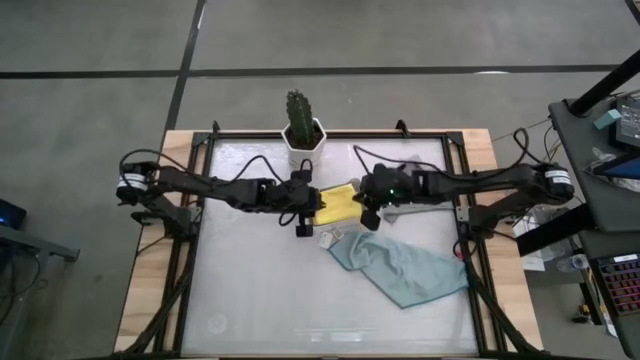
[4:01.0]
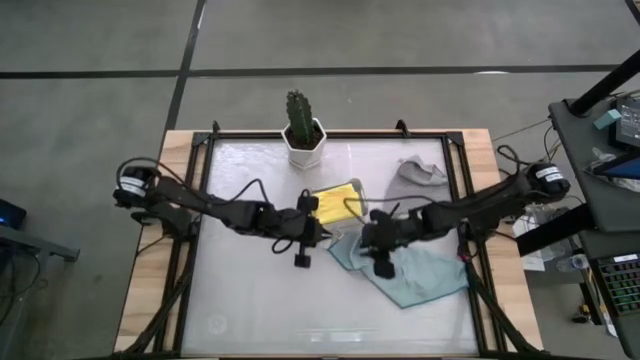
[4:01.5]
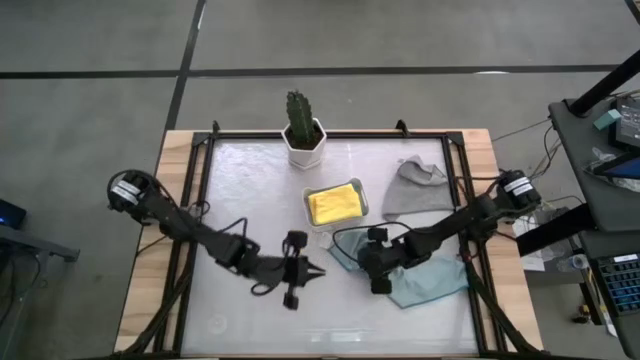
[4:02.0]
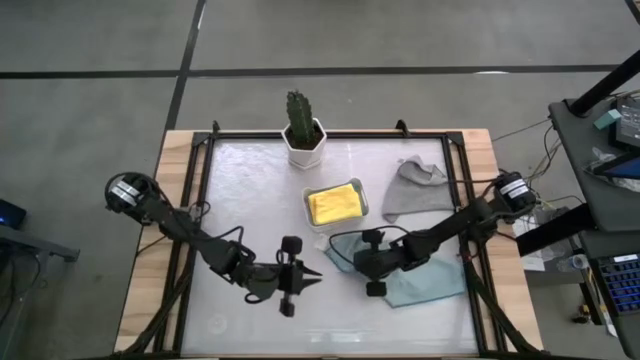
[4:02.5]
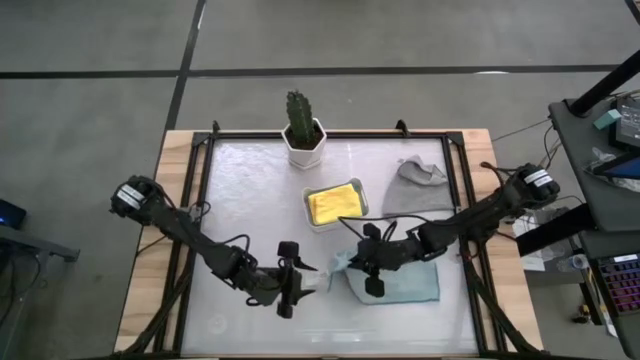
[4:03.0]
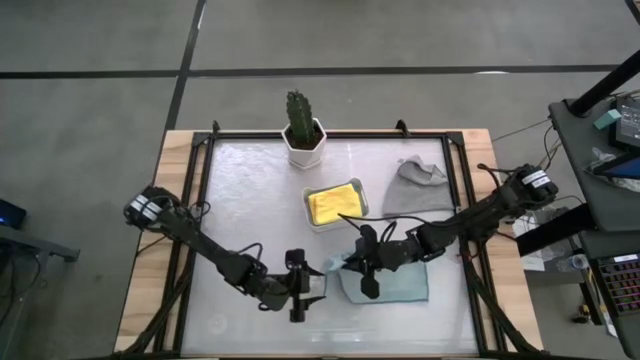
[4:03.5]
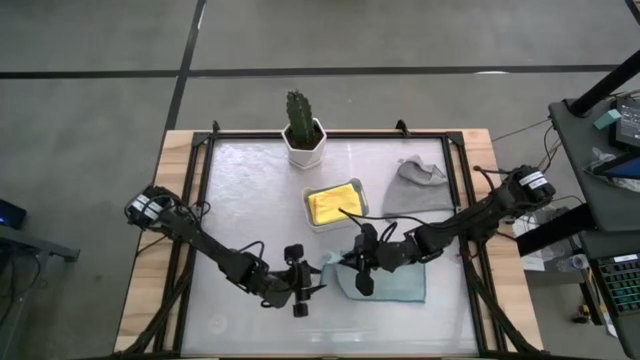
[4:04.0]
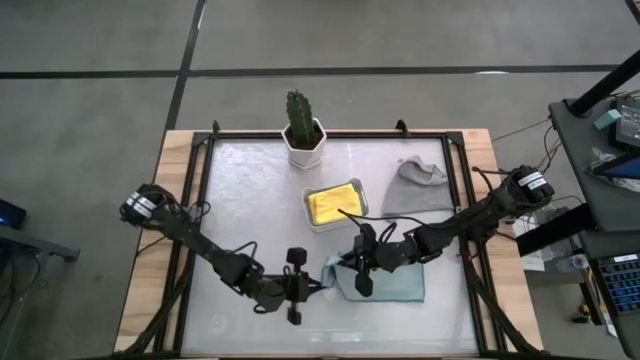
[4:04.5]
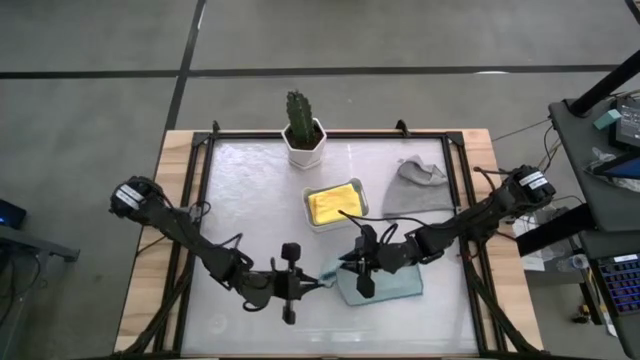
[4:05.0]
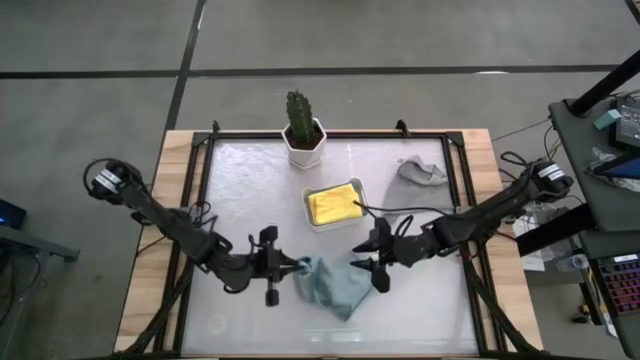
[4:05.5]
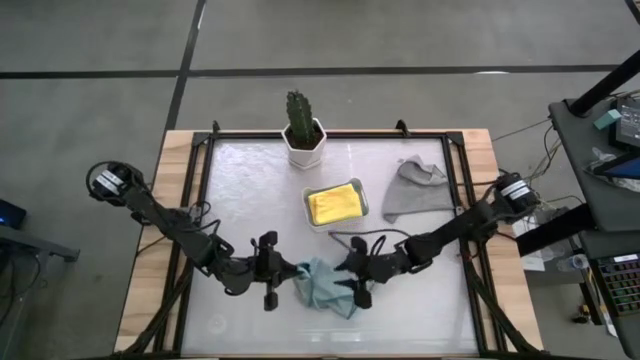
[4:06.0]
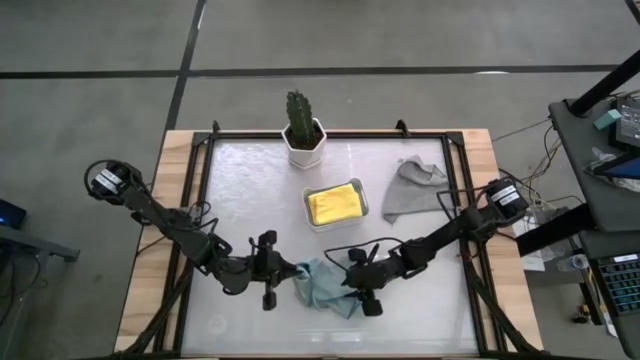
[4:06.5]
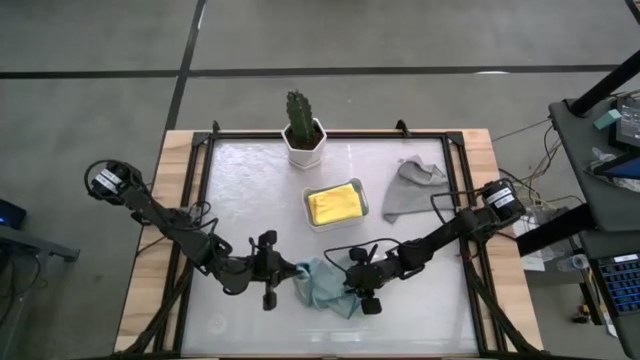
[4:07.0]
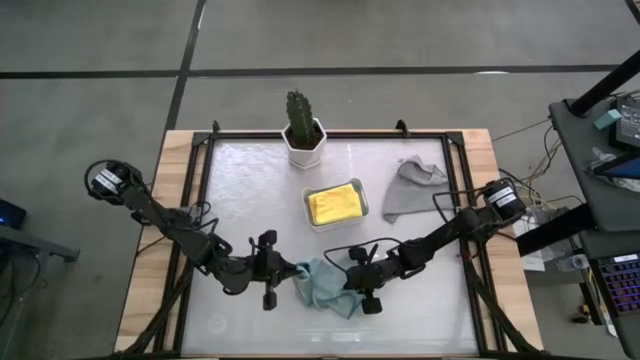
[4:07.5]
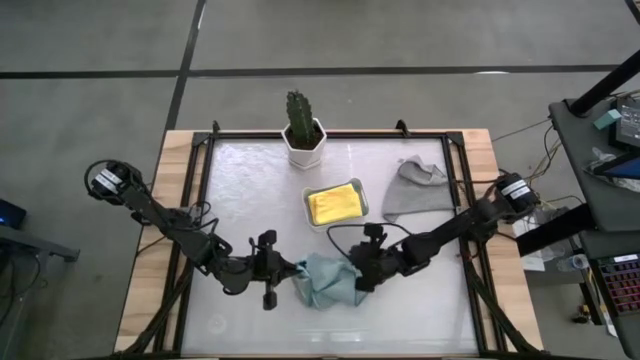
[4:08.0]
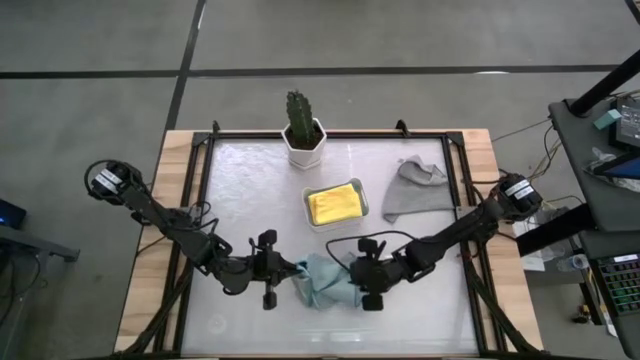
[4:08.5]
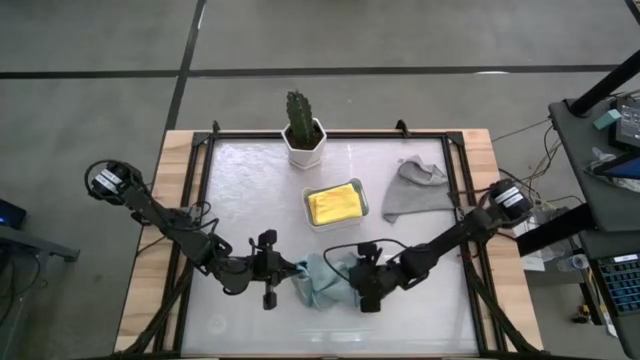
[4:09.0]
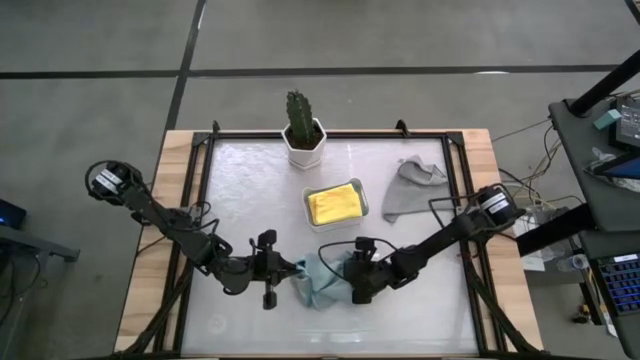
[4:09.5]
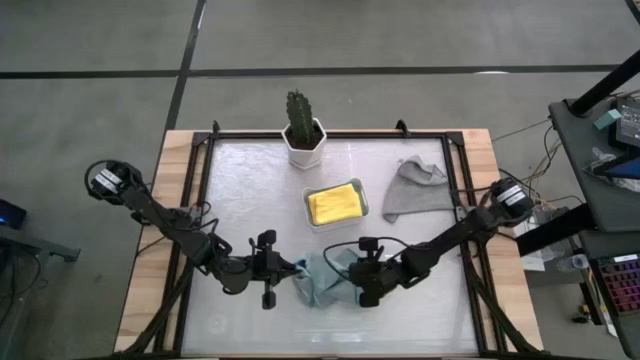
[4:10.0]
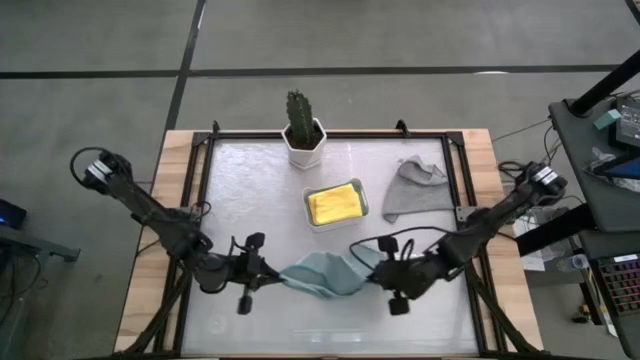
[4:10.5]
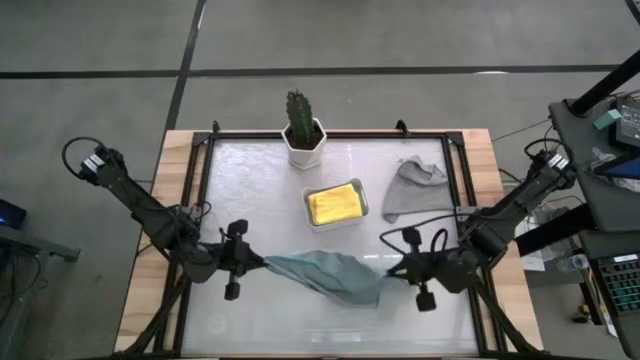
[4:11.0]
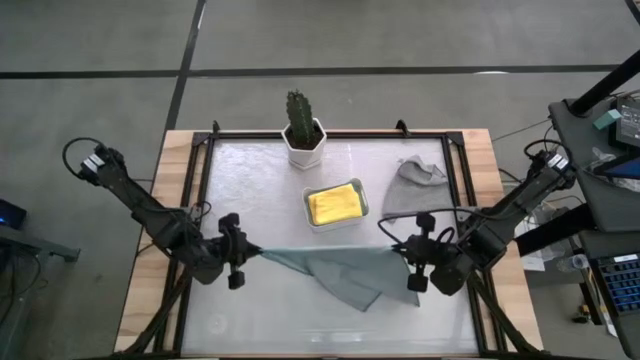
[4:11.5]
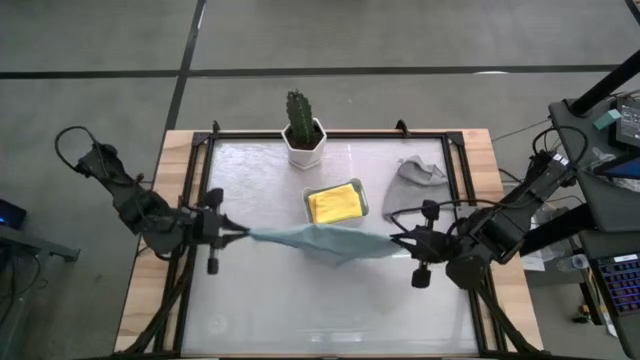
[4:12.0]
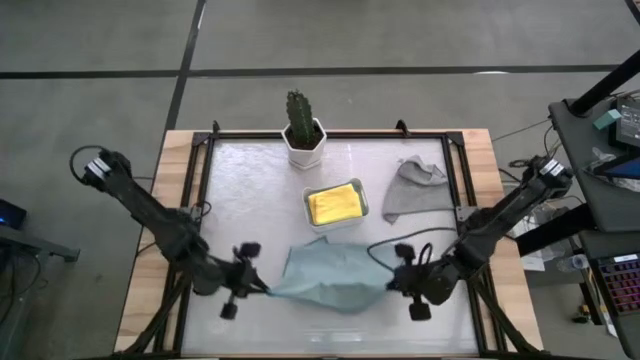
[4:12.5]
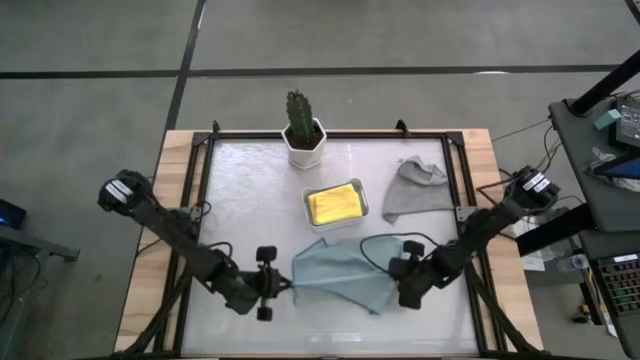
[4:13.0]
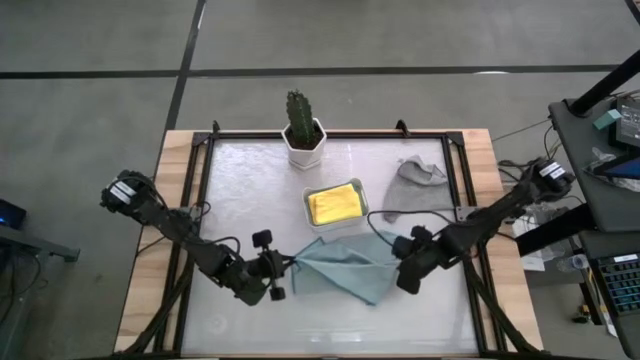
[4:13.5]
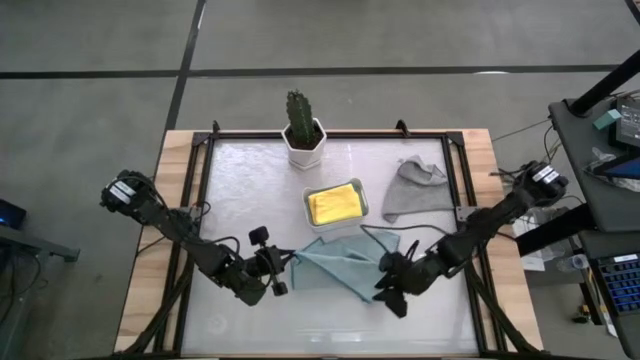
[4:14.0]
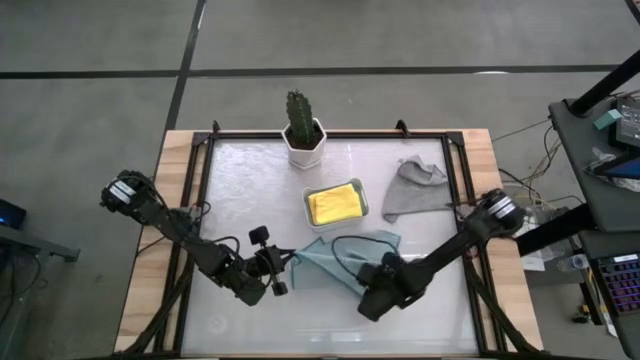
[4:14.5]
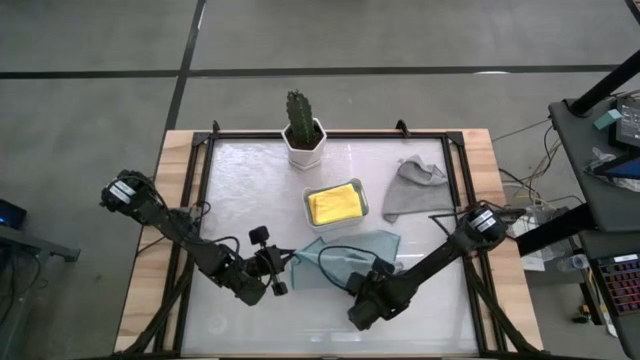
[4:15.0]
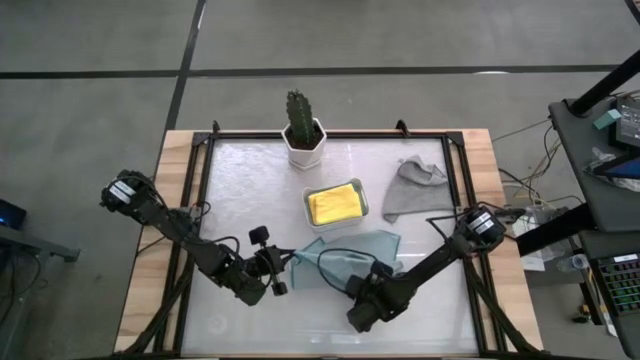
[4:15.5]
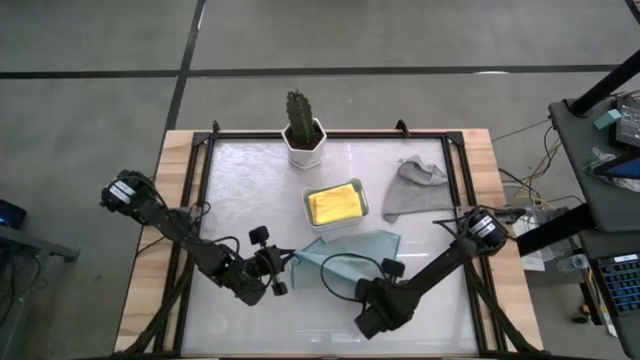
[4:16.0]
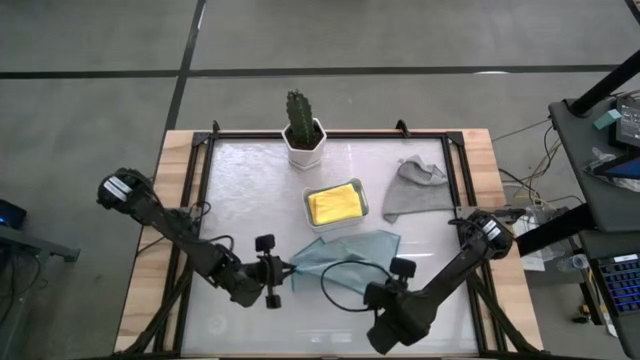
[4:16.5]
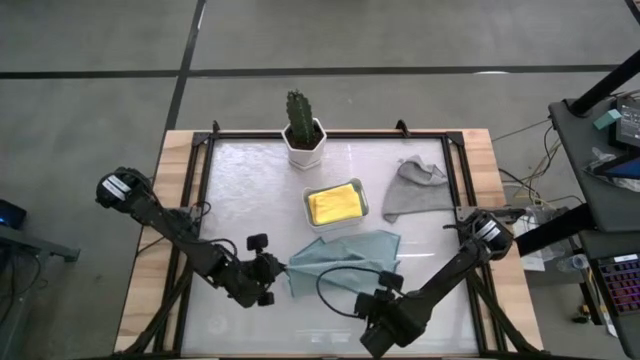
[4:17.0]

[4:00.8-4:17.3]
Task: Fold microfiber towels
Fold the light blue towel

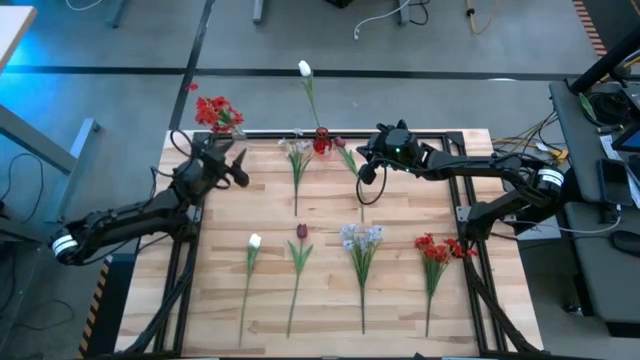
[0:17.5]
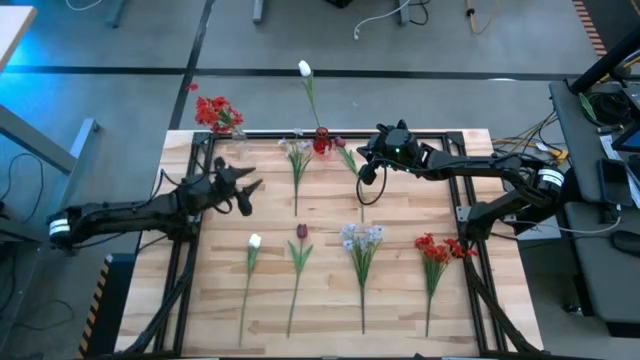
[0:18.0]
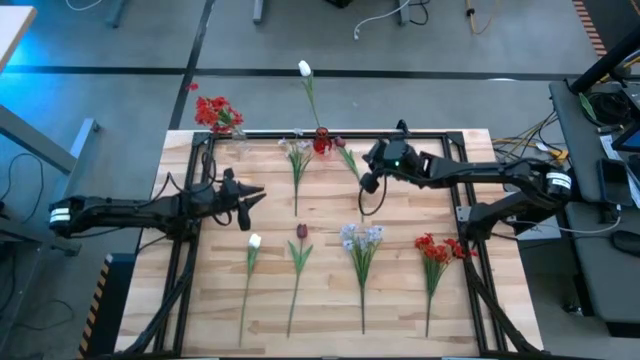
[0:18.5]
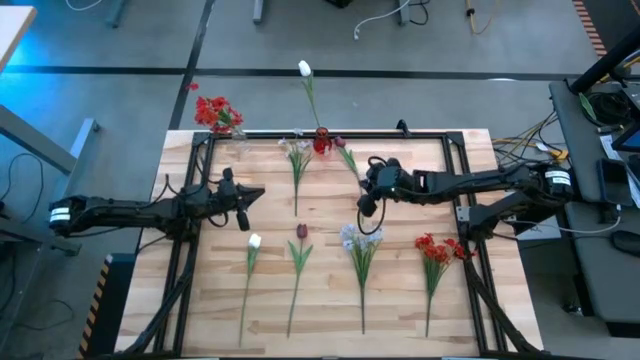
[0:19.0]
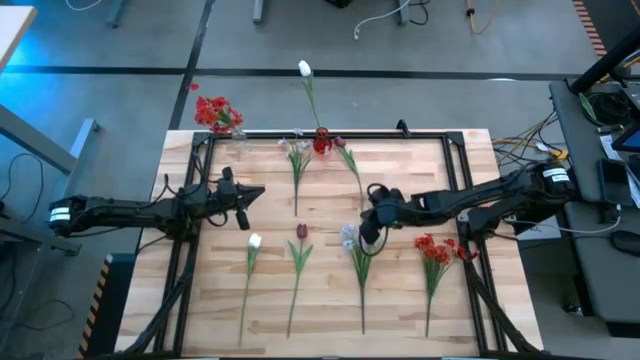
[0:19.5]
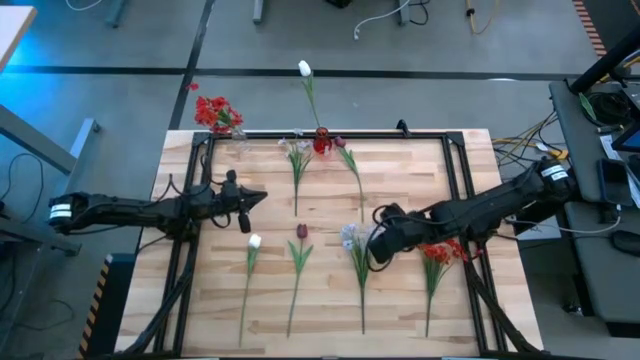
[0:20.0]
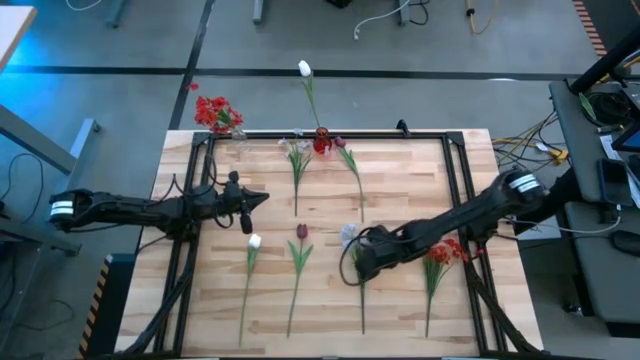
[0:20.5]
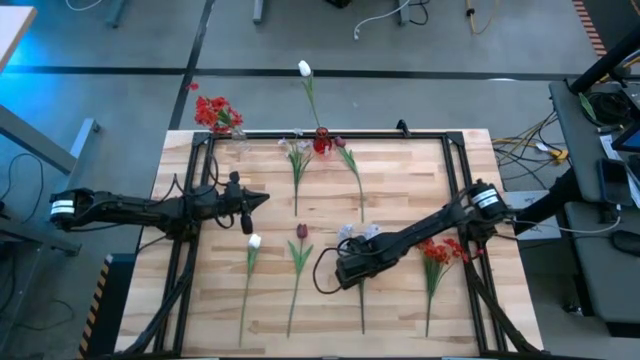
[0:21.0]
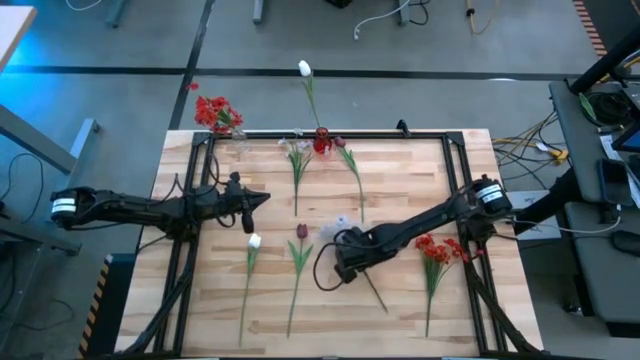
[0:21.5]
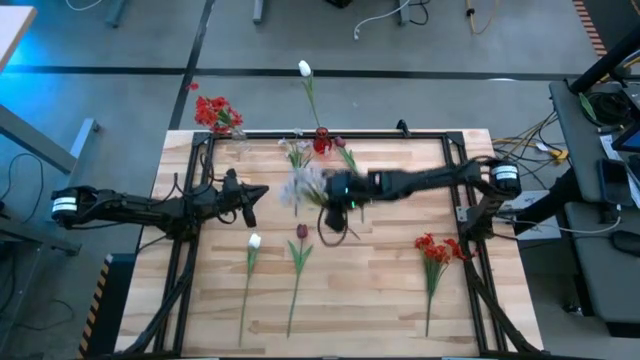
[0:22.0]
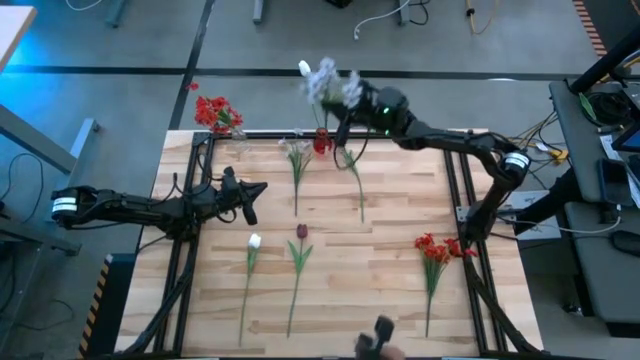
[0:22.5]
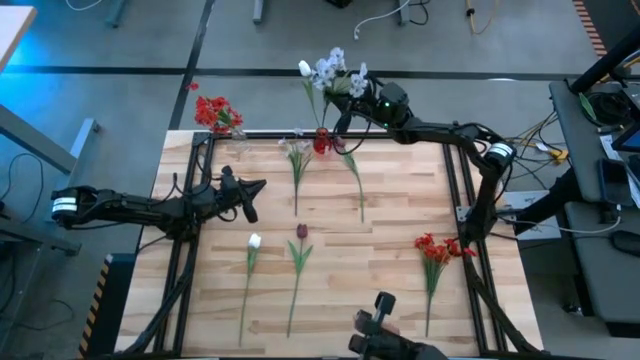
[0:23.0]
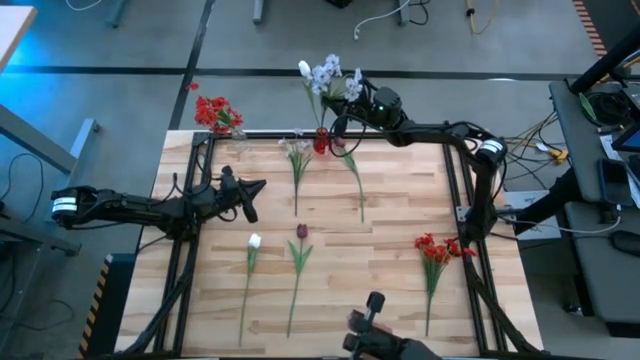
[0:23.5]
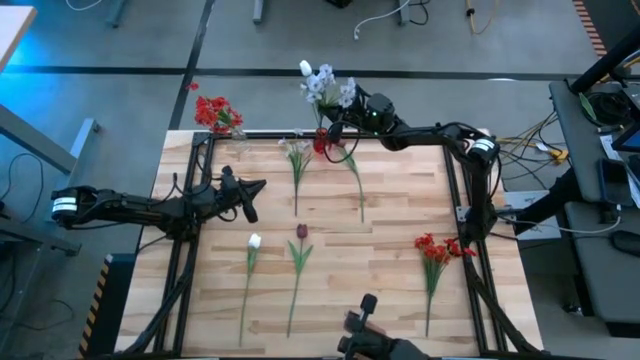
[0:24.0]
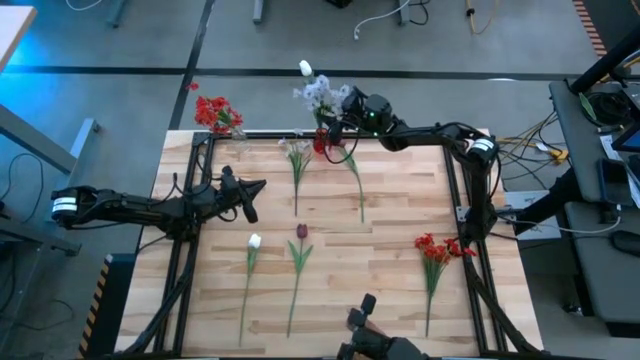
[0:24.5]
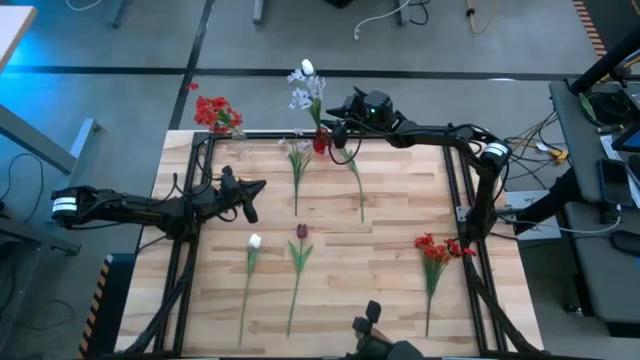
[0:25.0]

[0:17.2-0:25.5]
Task: Sort flowers into vase by color
Put the bottom white flowers into the red vase
